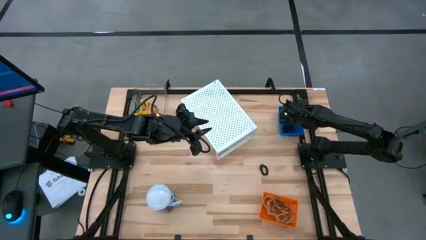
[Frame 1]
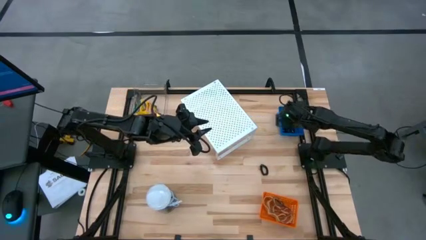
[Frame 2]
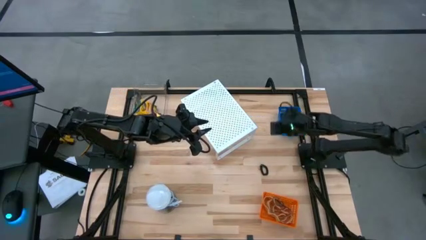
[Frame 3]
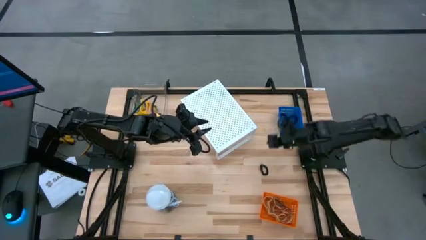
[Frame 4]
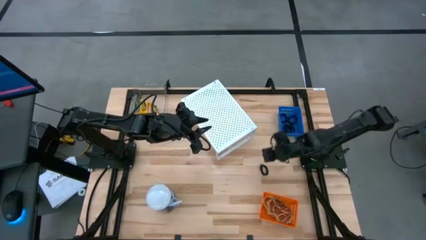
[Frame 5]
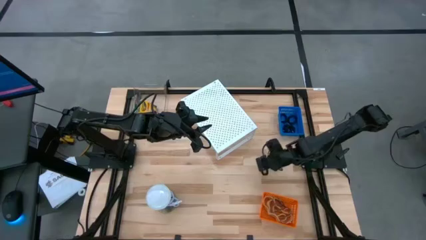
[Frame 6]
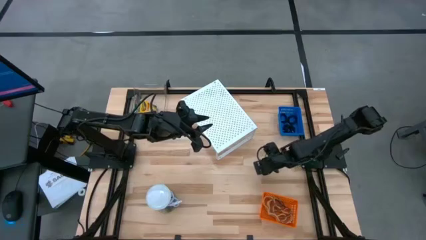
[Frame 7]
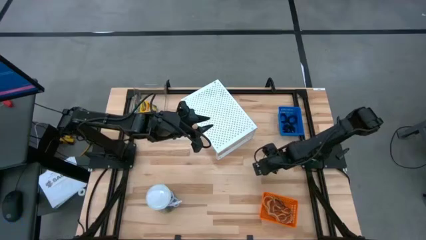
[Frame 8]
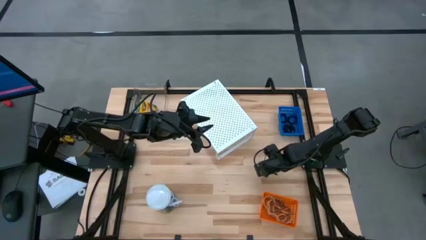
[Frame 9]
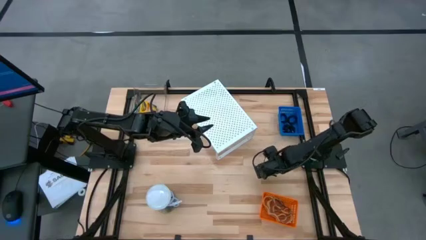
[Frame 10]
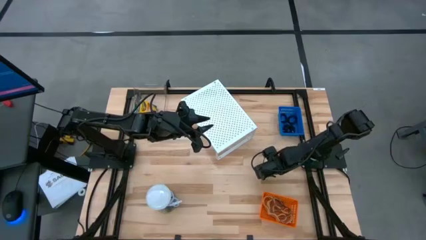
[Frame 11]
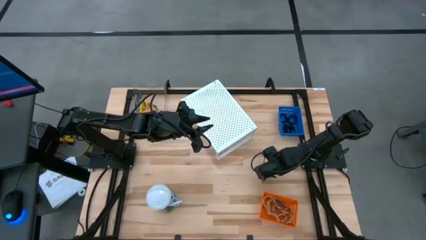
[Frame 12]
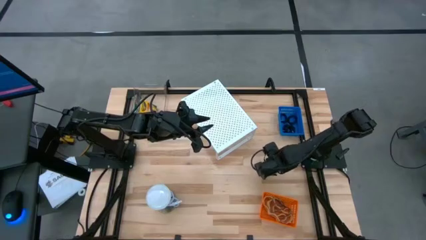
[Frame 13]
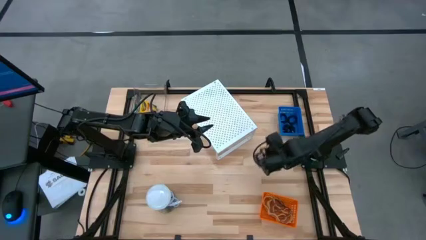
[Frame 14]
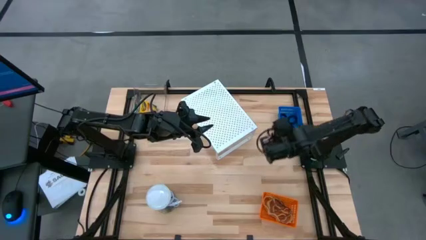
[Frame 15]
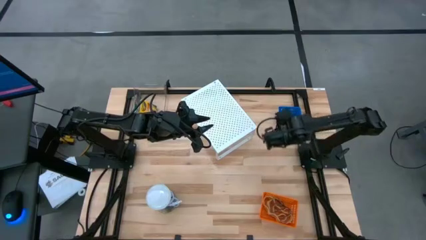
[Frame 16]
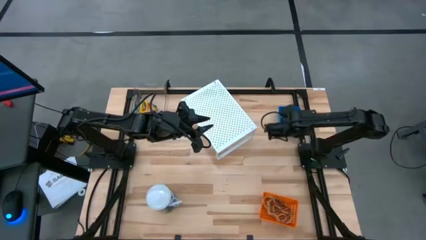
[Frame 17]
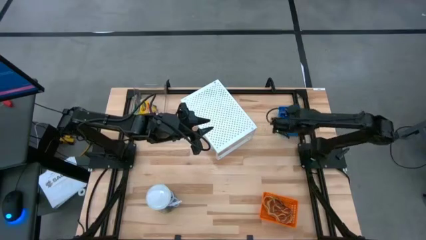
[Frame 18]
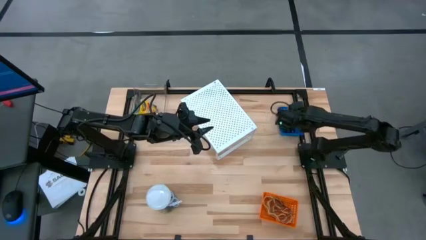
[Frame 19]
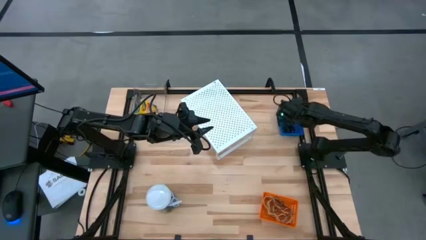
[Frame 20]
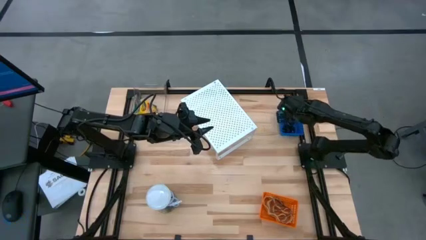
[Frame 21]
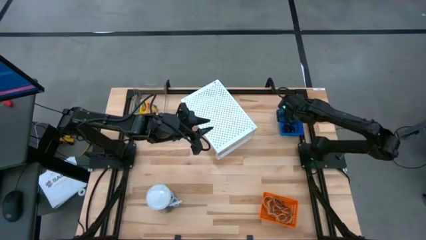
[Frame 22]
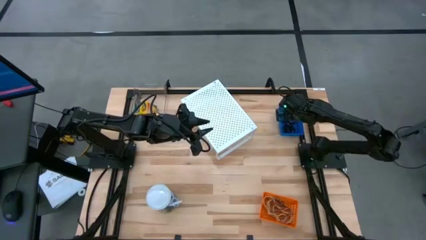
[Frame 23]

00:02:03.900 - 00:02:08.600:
Task: Pick & Place Office Desk Supplies
Put the black spring keychain into the blue bin

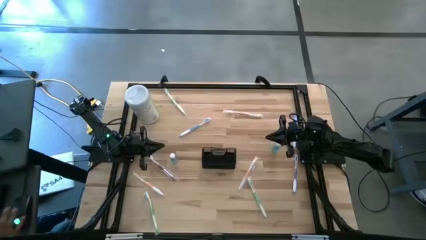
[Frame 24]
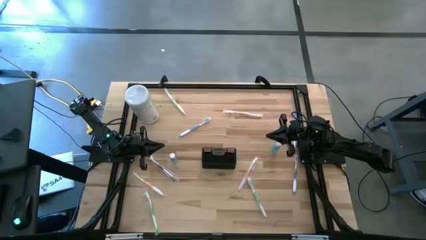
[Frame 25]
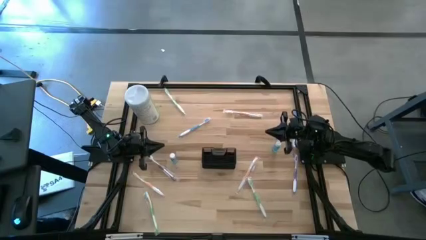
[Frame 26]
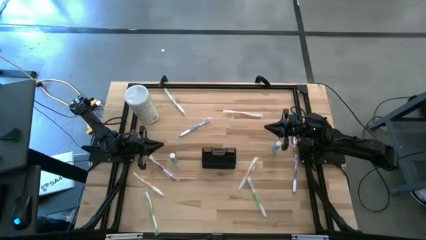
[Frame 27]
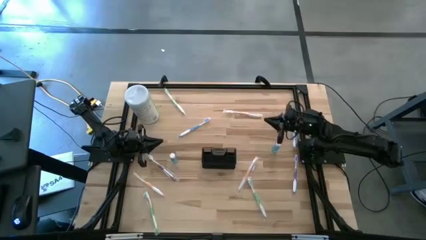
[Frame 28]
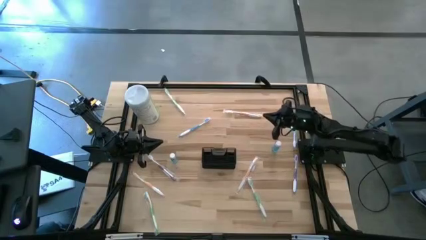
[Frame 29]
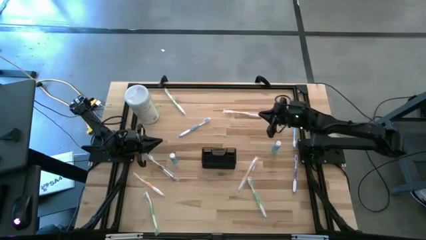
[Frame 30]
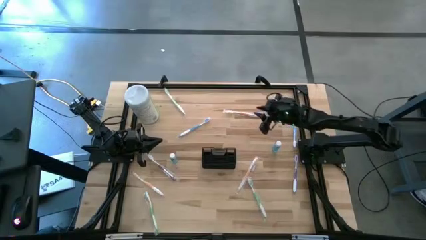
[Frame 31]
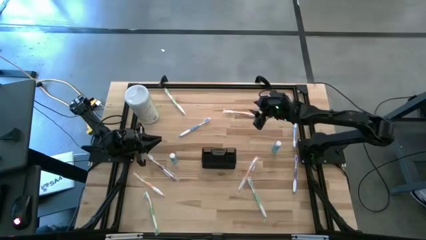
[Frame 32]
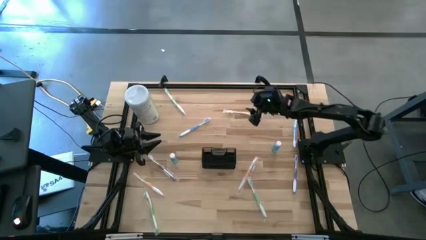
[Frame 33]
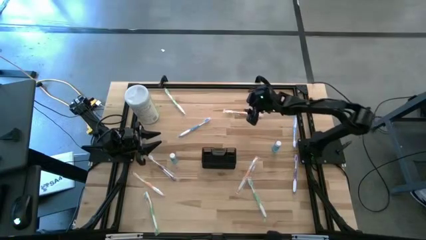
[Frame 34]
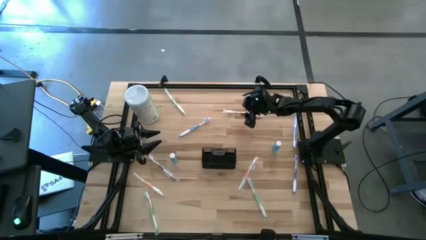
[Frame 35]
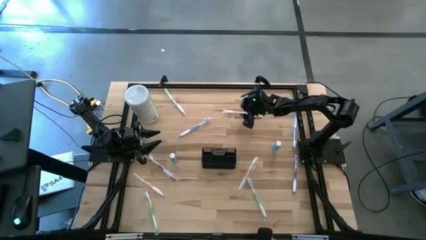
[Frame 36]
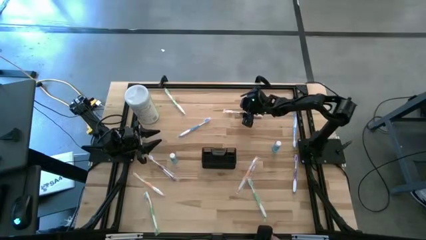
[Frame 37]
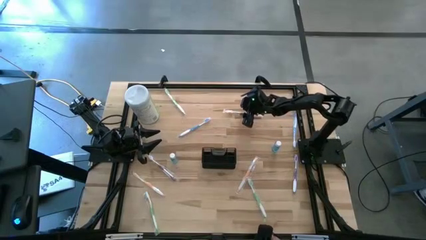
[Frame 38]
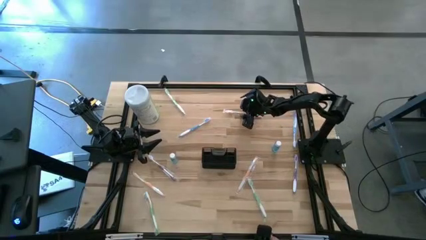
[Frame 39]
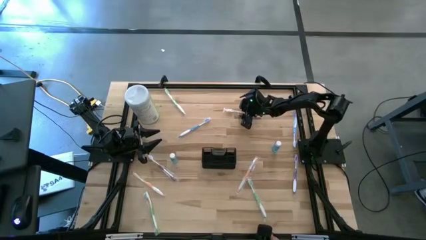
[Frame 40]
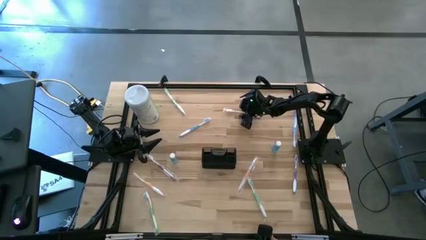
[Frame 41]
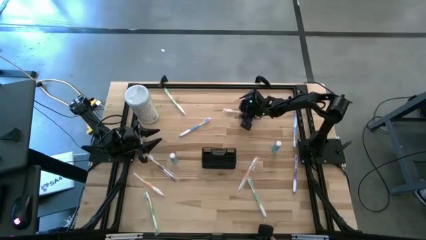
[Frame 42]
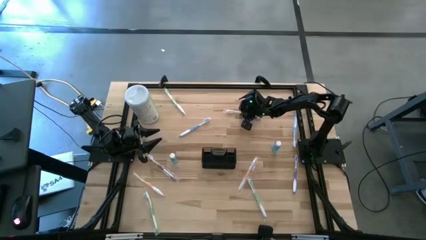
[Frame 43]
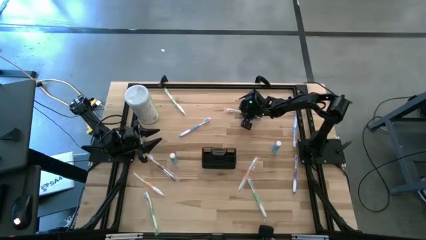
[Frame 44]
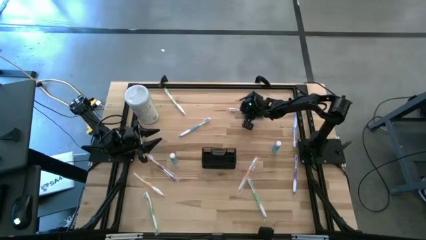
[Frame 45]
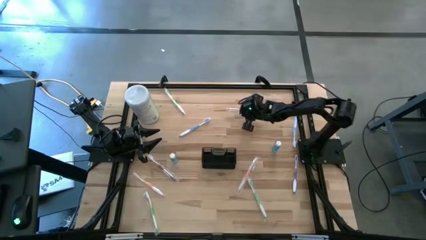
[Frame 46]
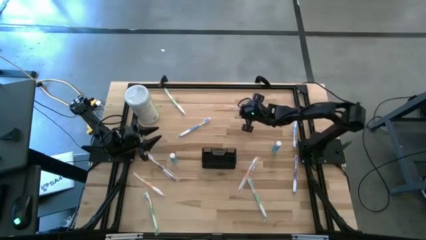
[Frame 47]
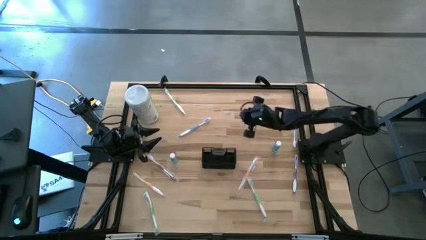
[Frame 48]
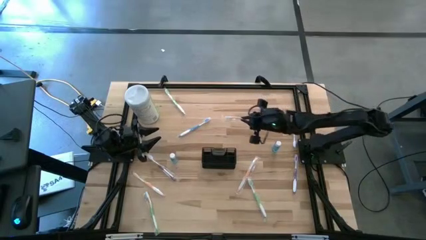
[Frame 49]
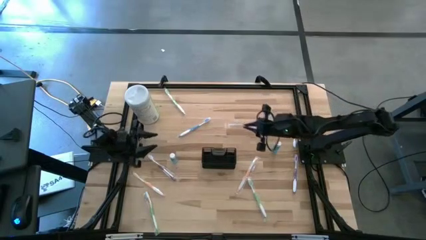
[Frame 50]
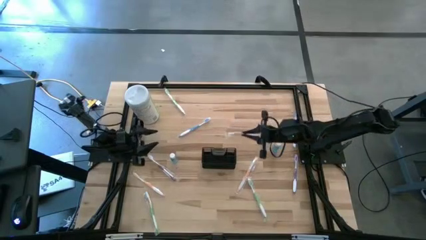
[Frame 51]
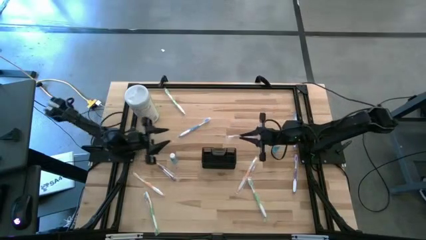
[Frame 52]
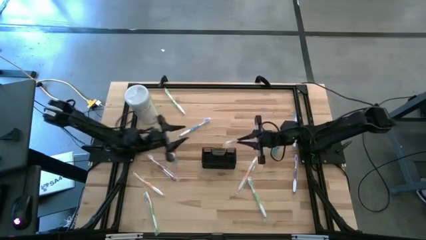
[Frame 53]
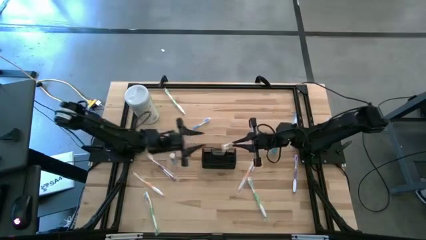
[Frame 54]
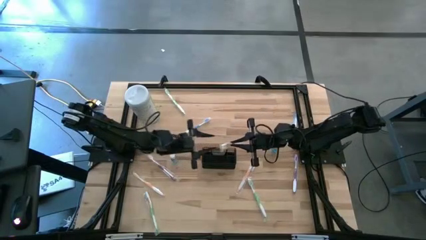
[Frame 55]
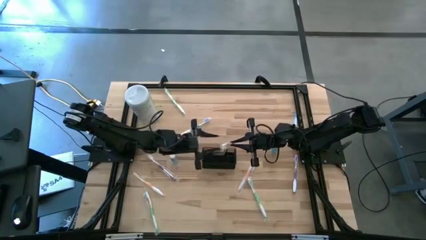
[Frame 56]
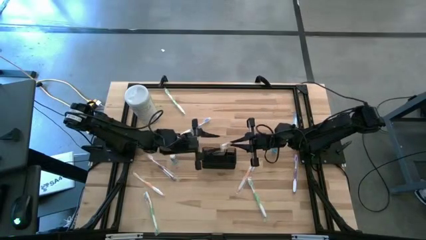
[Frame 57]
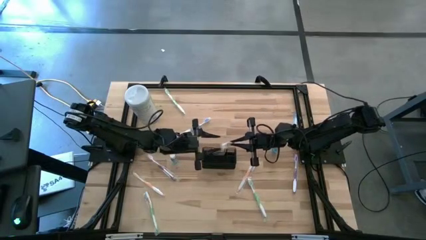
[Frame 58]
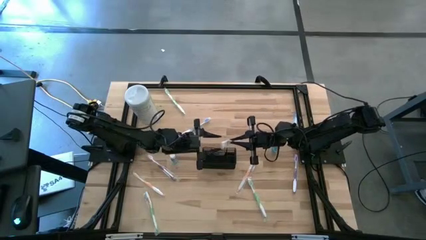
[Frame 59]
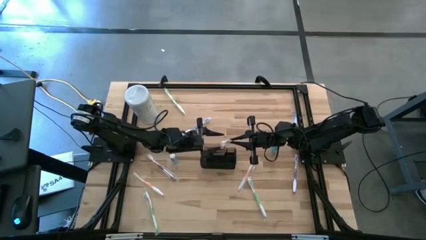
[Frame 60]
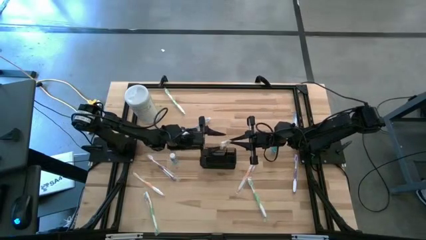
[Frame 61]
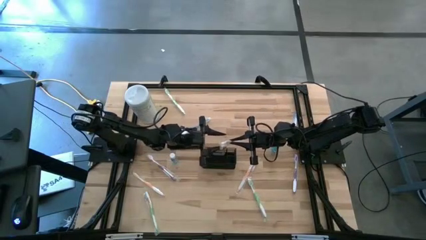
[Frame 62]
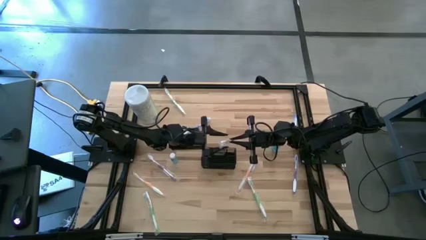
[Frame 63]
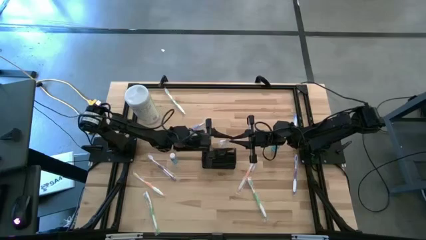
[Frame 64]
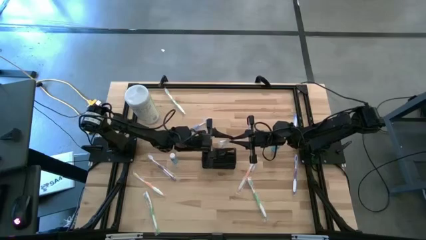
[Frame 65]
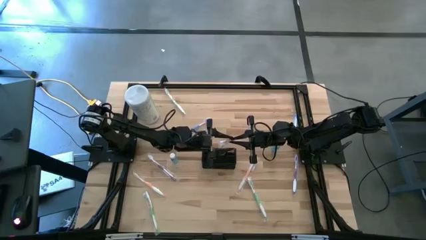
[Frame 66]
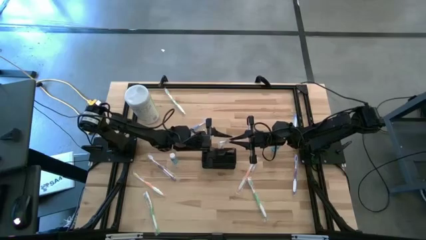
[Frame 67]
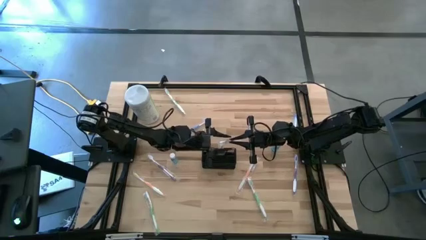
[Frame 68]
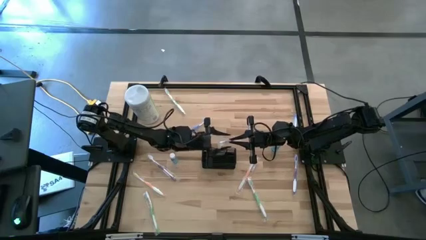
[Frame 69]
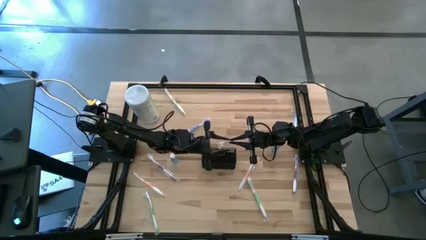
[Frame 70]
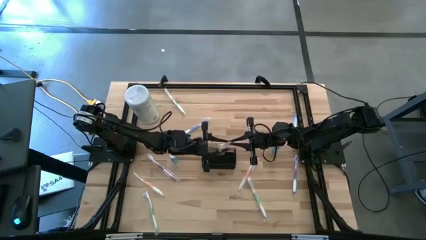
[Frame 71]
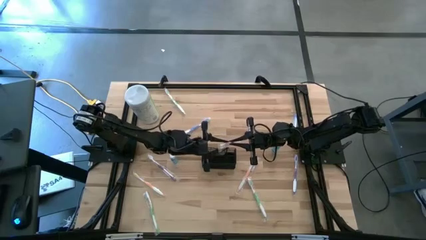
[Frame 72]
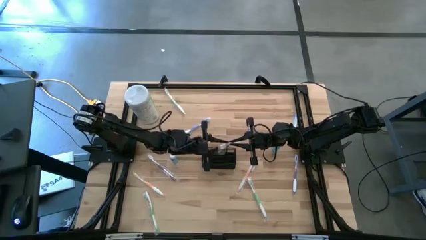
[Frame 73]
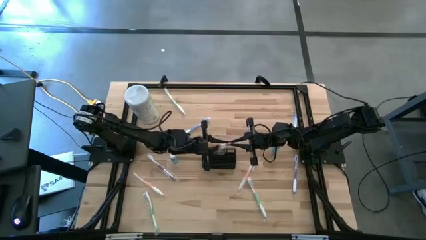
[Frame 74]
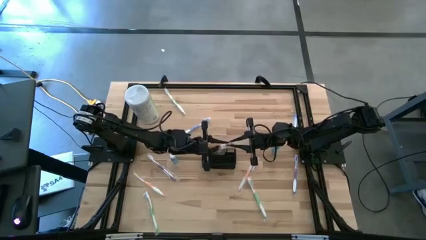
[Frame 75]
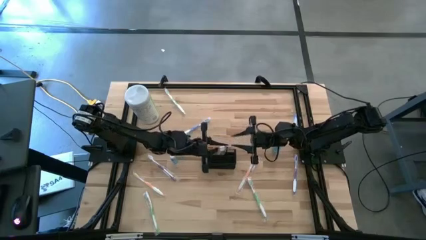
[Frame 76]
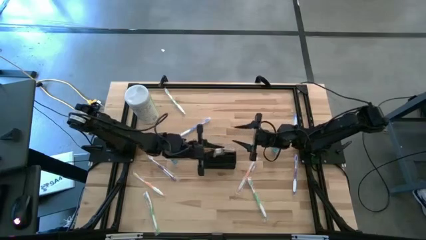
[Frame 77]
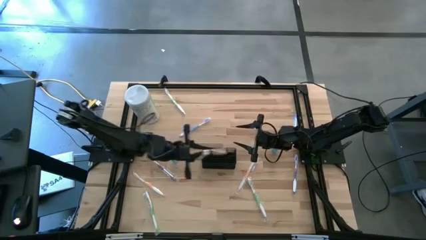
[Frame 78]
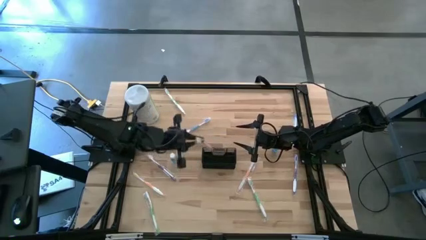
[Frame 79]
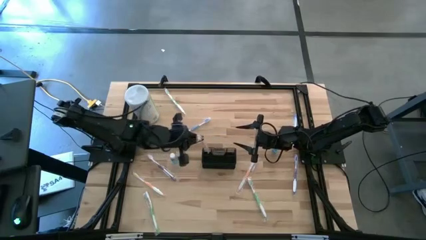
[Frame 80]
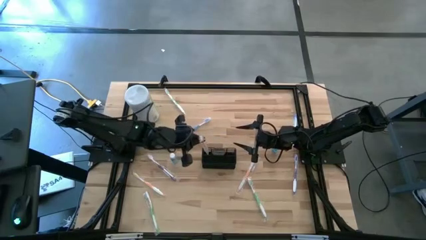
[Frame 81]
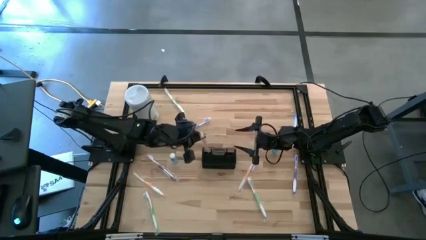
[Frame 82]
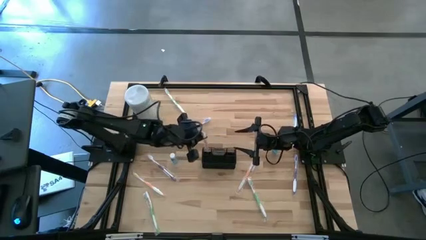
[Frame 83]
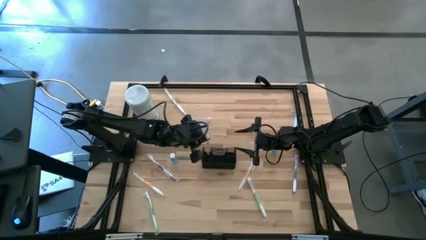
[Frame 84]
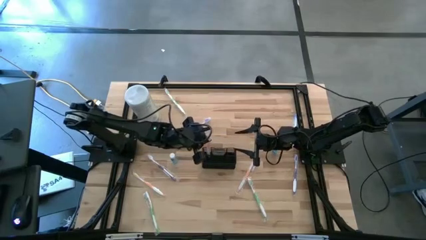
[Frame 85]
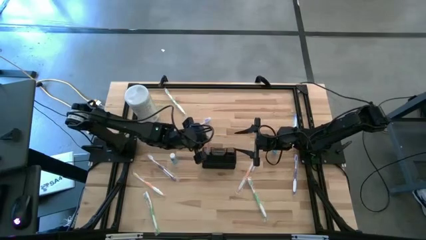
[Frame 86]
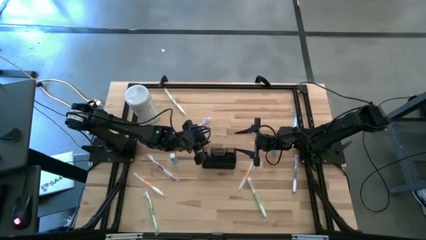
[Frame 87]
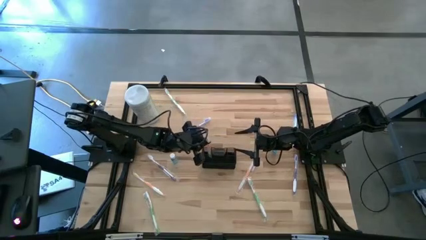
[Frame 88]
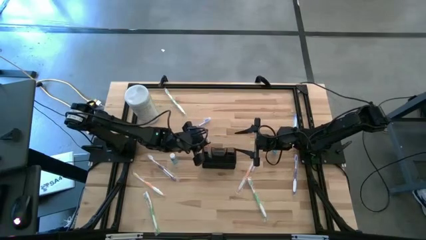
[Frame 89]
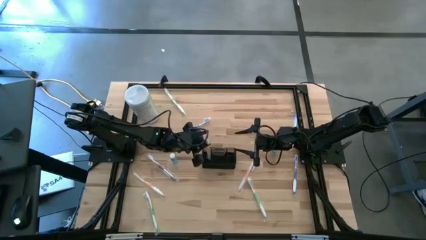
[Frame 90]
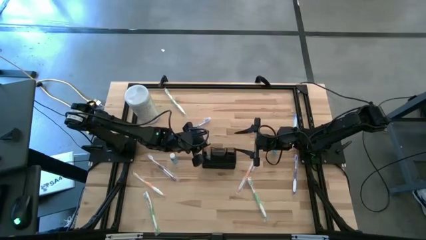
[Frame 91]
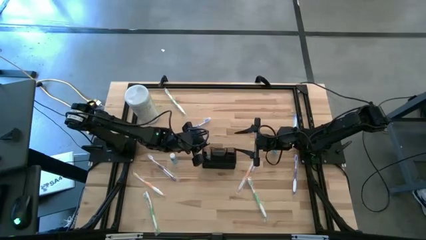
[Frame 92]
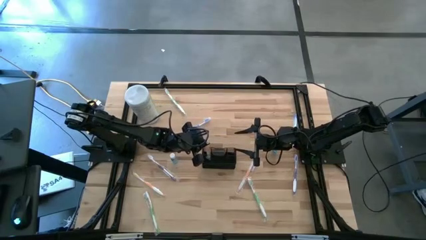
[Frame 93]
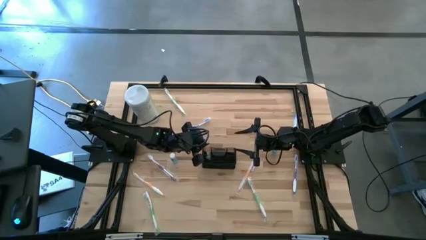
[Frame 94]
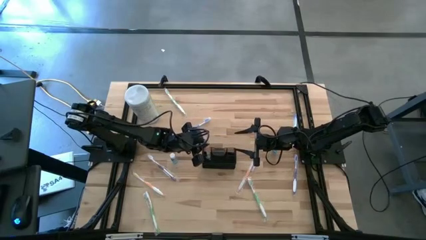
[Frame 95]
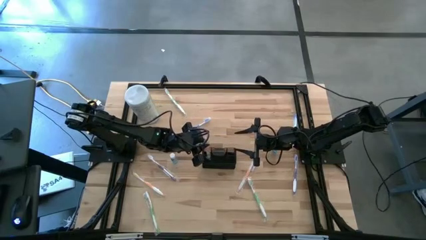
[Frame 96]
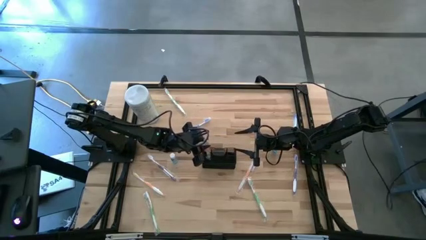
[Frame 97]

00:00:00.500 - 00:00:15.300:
Task: Pick & Place toothbrushing station
Put the top orange toothbrush into the mesh organizer
